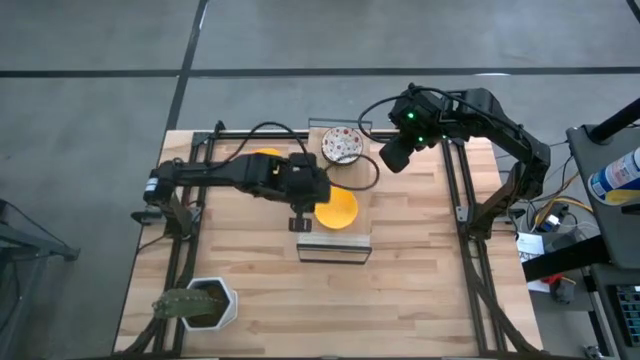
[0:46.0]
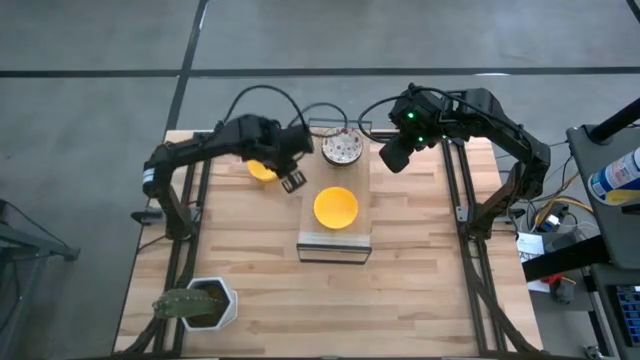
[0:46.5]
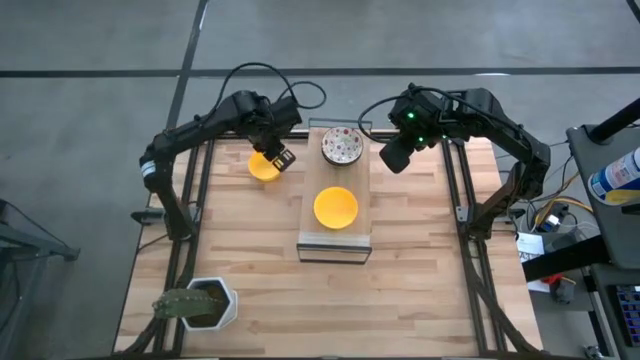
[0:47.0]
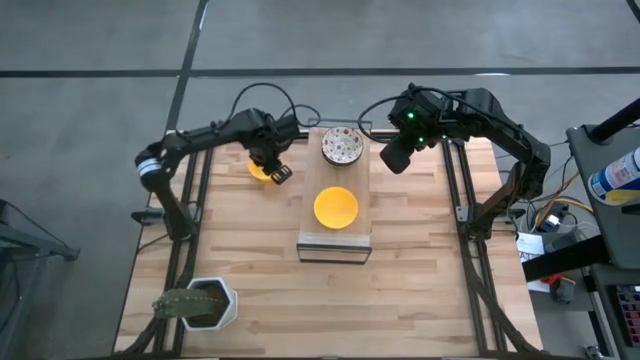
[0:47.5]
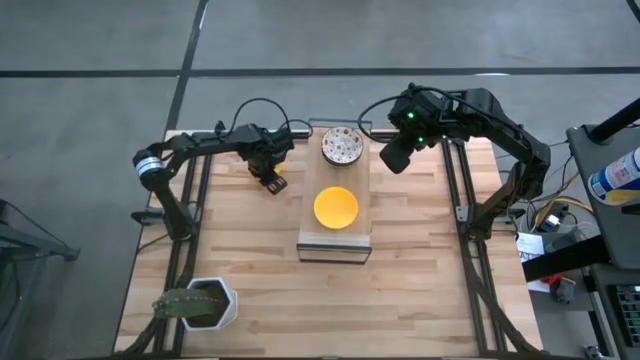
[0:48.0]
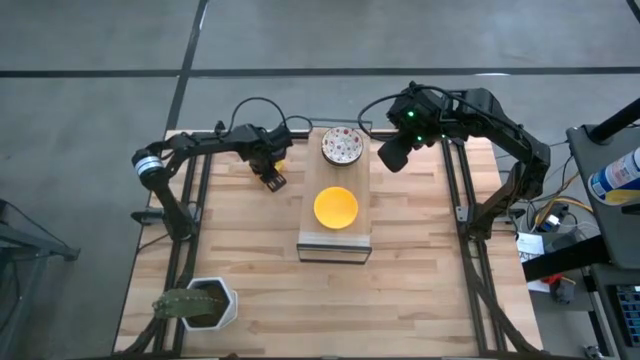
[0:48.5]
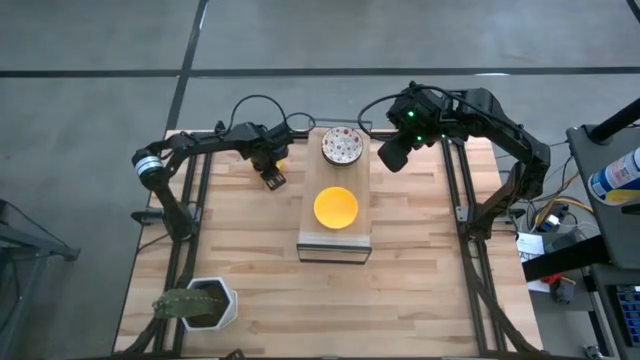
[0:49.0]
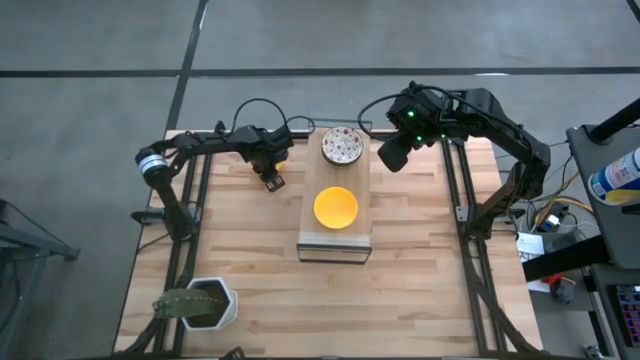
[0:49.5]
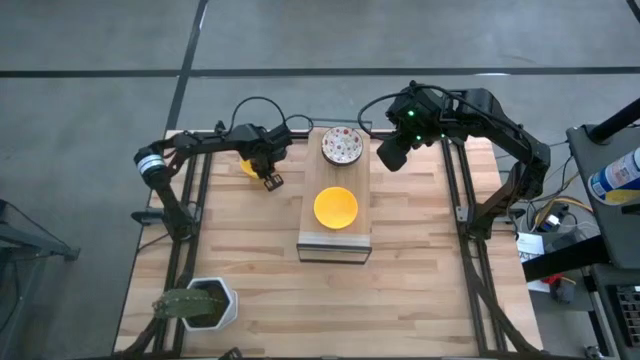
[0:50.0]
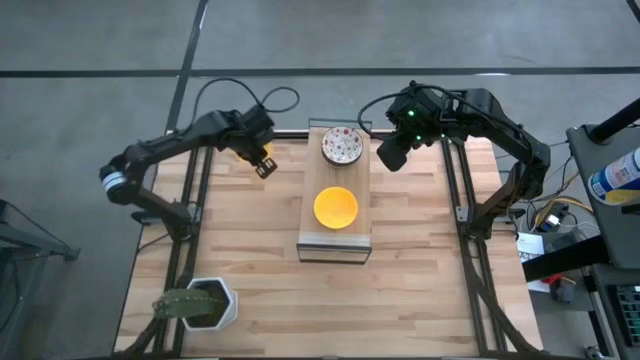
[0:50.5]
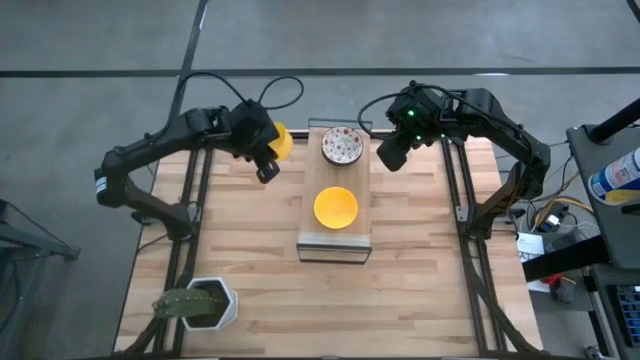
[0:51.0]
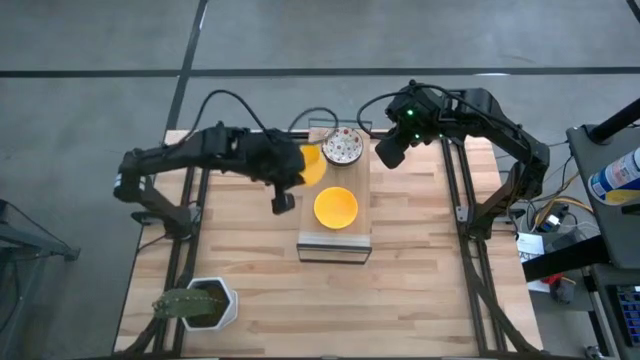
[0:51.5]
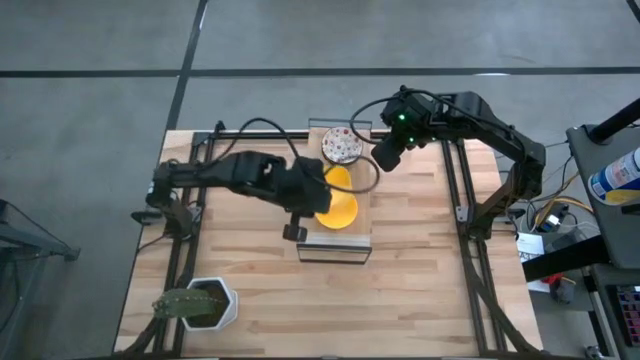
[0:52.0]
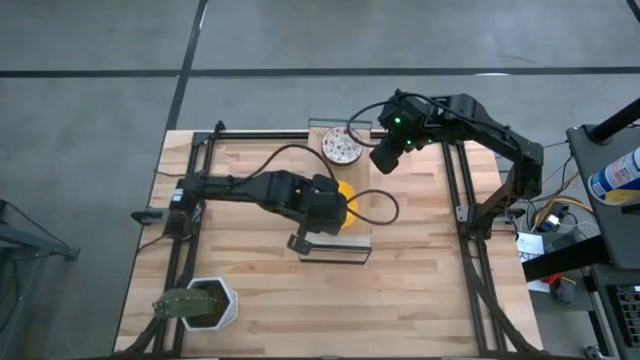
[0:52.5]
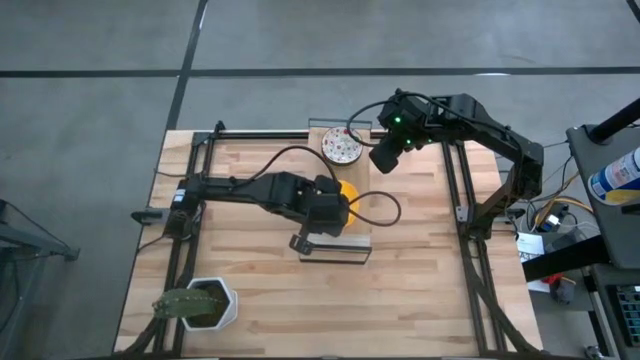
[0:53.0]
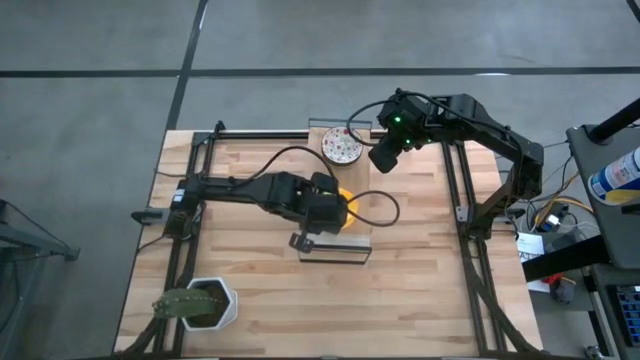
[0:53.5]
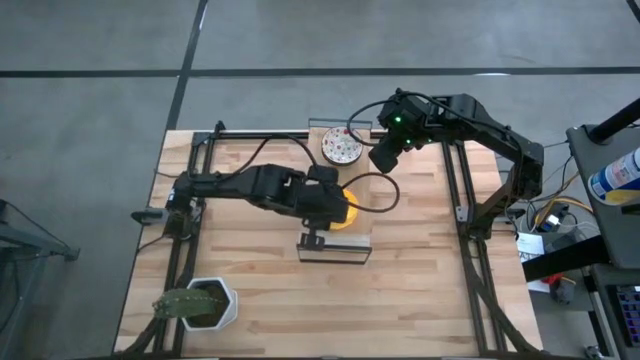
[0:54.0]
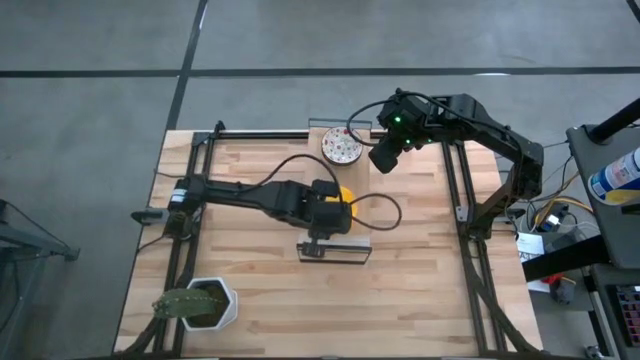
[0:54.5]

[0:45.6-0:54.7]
Task: Pick & Place Mini bowls
Stack the yellow bowl on the yellow bowls on the shelf

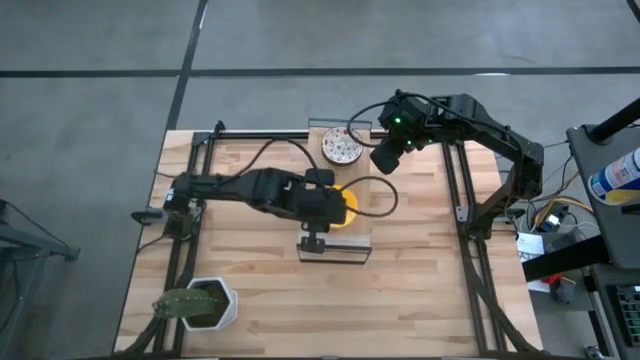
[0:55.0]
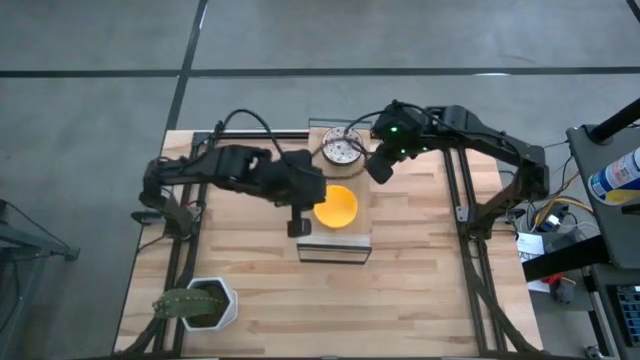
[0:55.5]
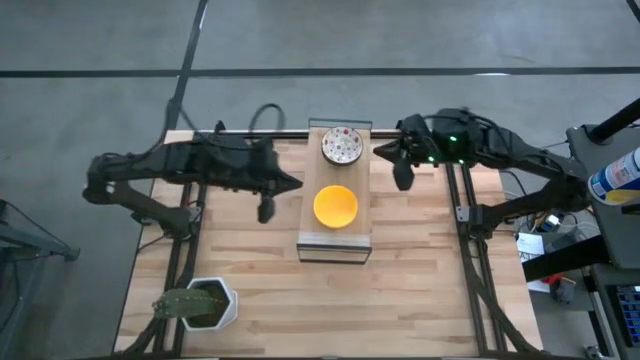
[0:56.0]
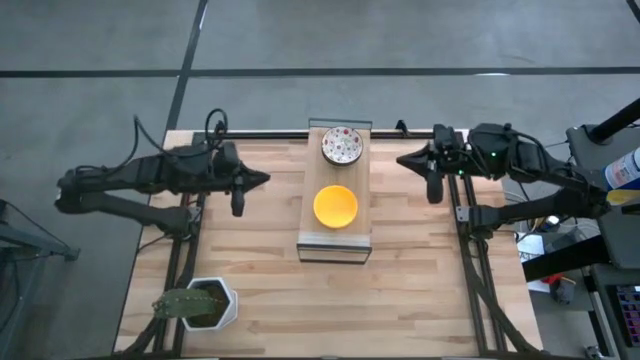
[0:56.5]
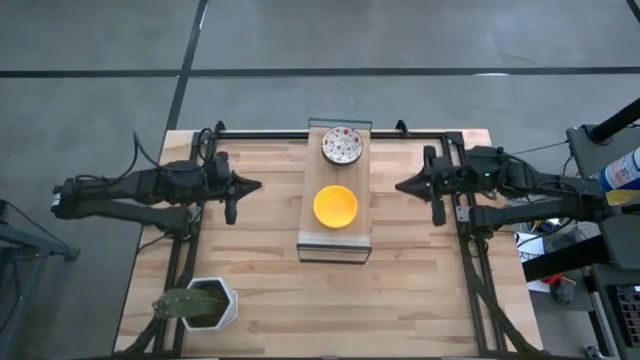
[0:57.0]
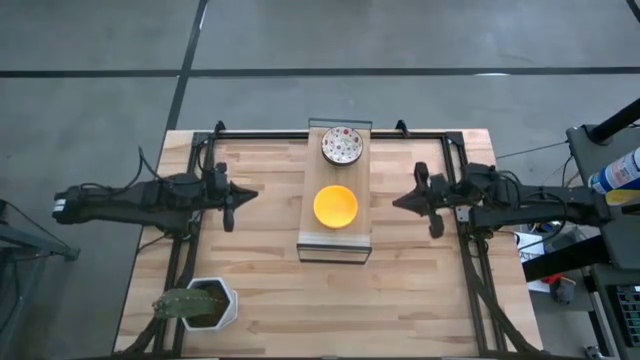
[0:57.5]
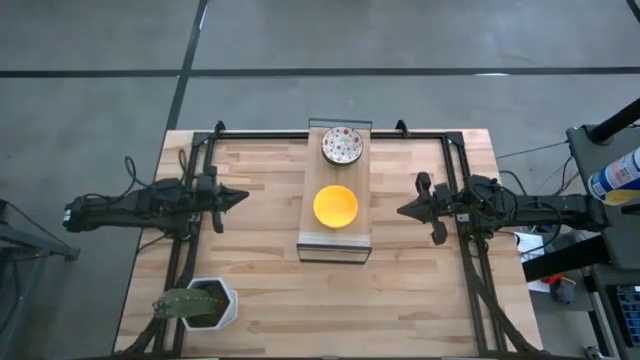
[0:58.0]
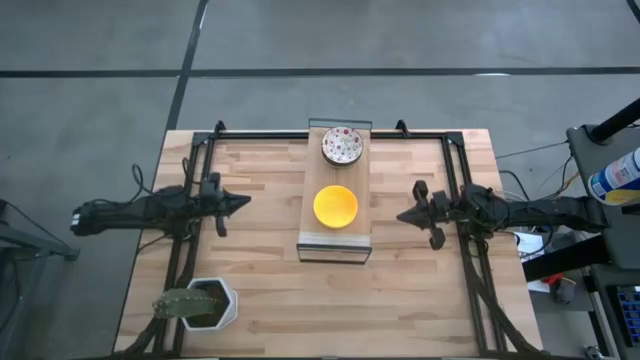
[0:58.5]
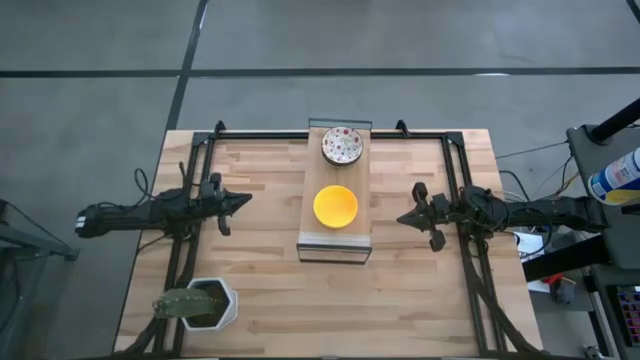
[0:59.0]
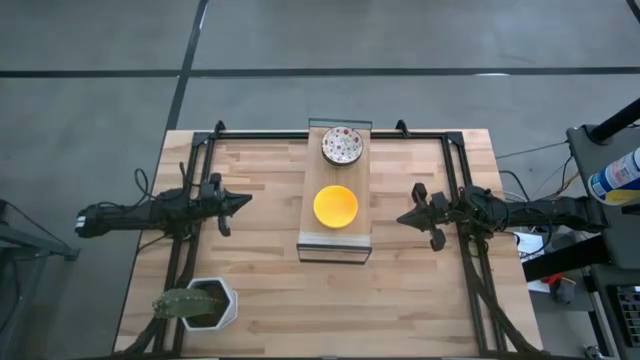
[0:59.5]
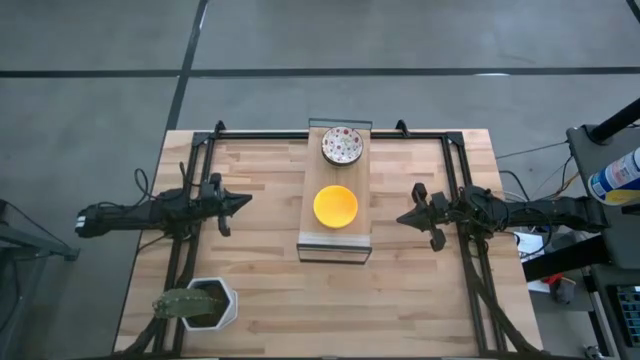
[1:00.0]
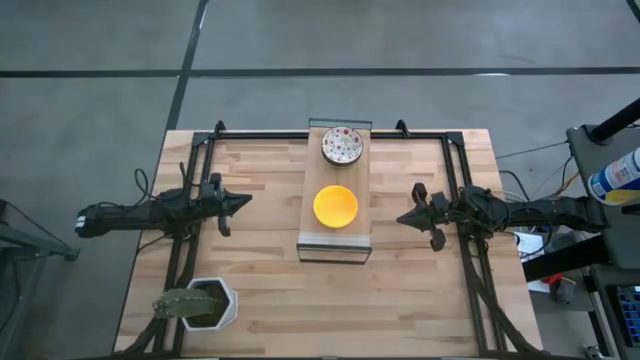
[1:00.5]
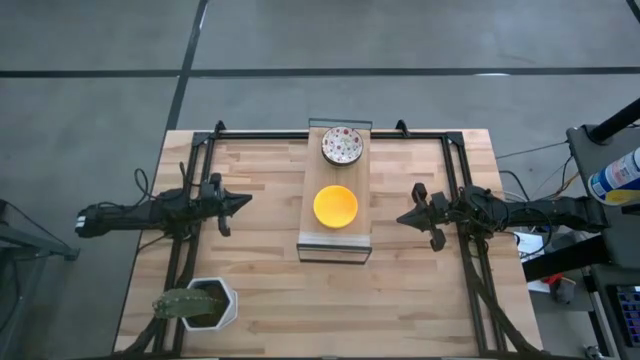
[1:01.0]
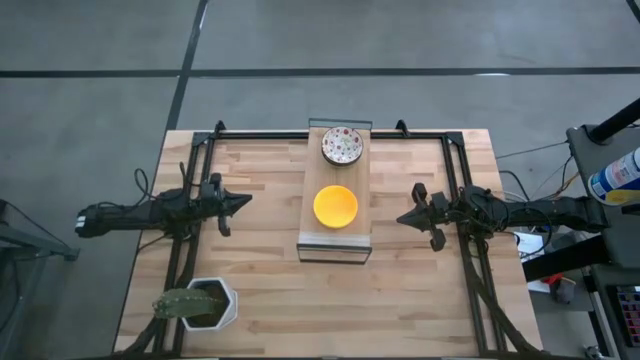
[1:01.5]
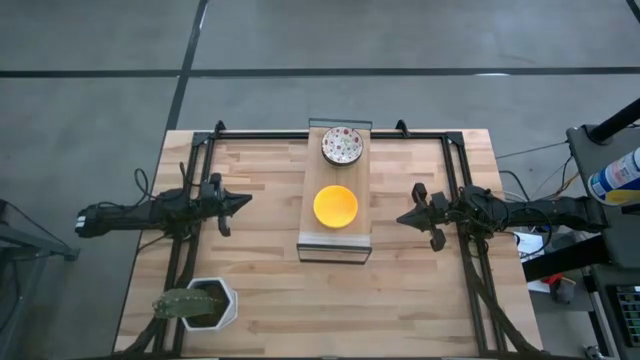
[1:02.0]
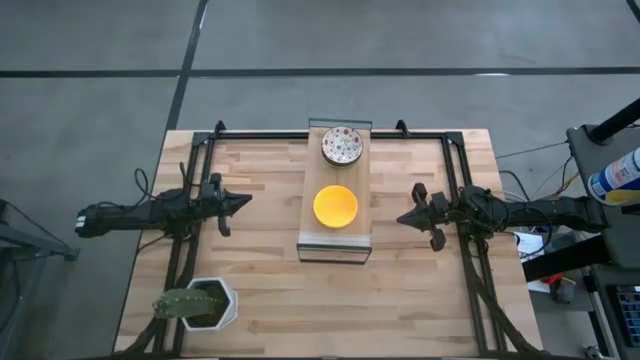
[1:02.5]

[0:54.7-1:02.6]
Return to Home Position

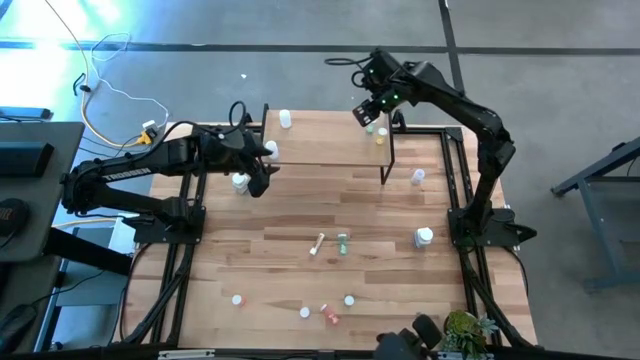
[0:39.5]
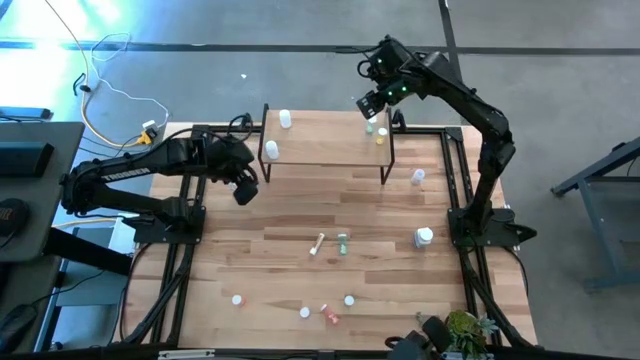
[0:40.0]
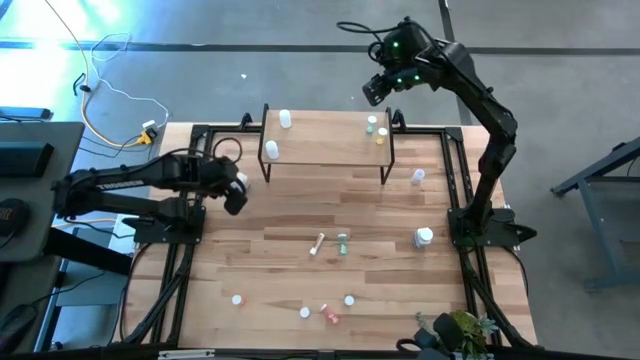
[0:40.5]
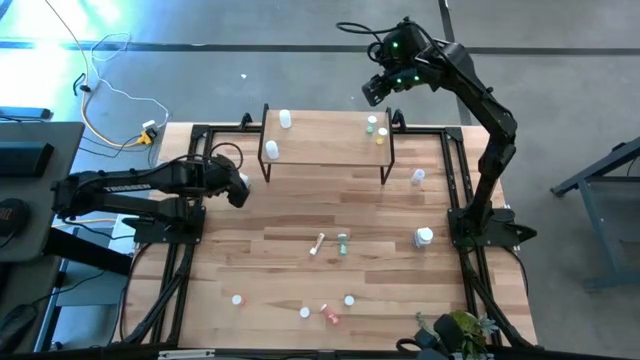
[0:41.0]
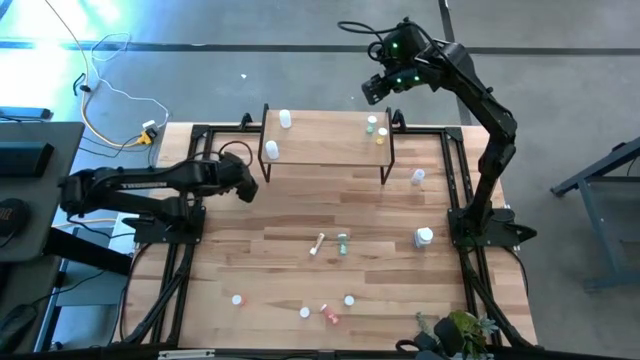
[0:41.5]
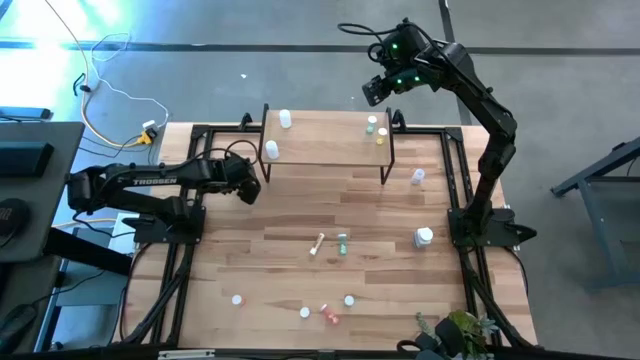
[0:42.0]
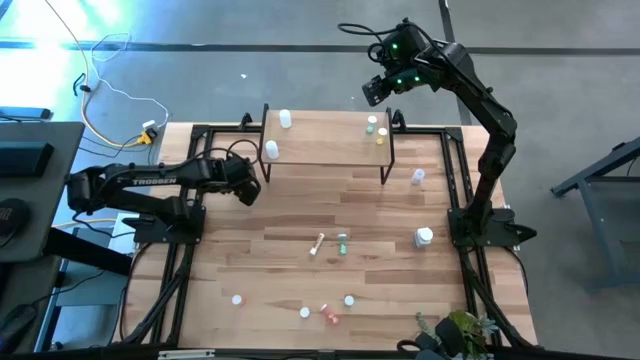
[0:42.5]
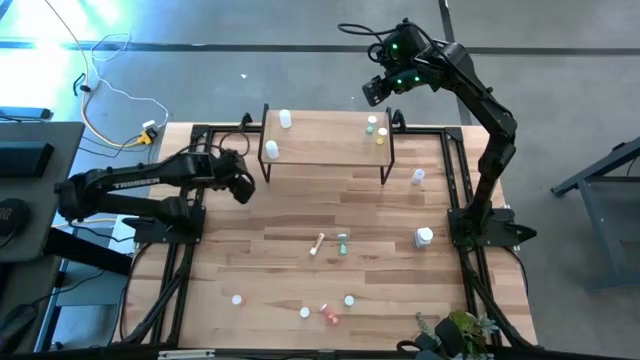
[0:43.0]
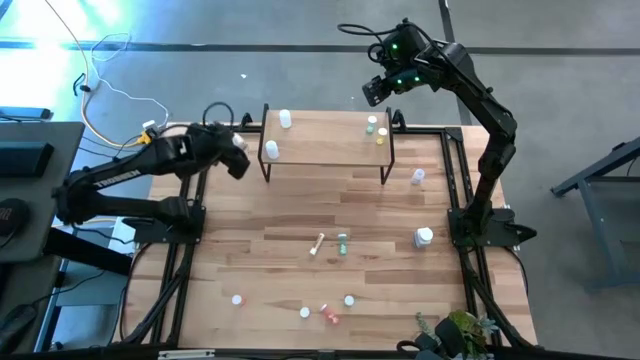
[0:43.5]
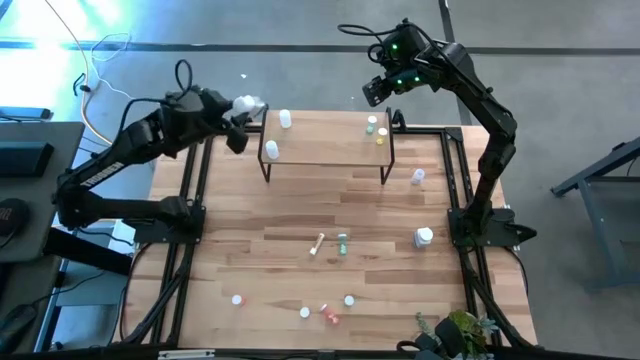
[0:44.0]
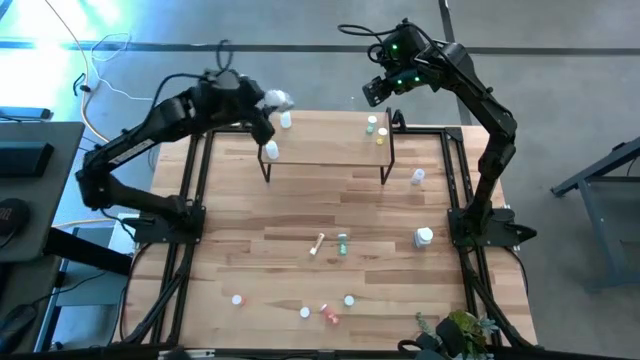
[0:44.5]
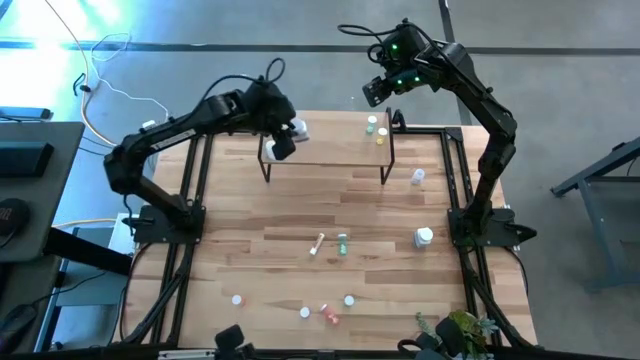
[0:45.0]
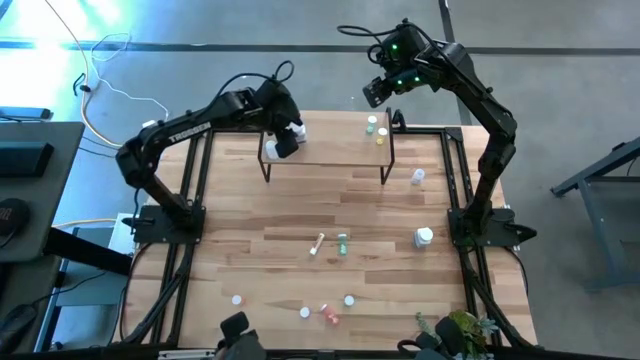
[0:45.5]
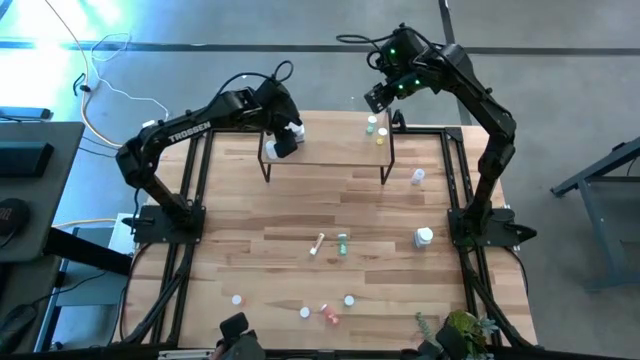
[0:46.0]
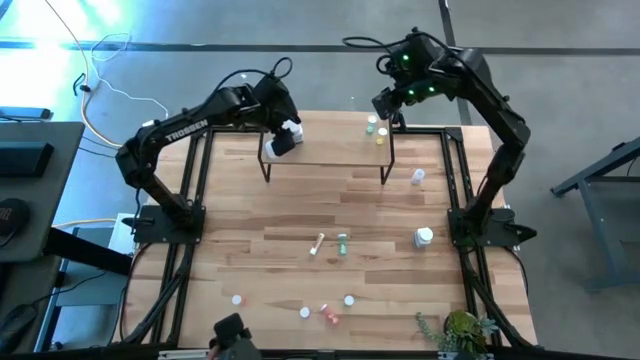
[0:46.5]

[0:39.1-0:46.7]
Task: Pick and place medicine bottles onto shelf by color
Put the top large white pill bottle on the shelf
